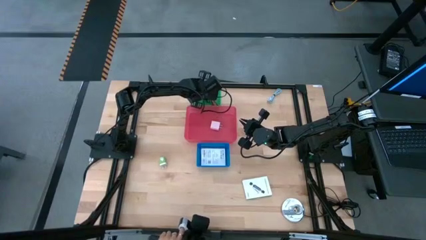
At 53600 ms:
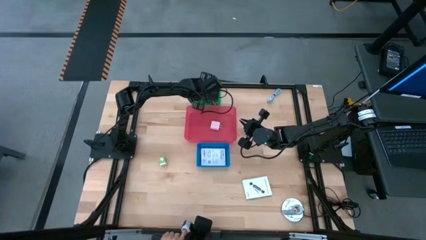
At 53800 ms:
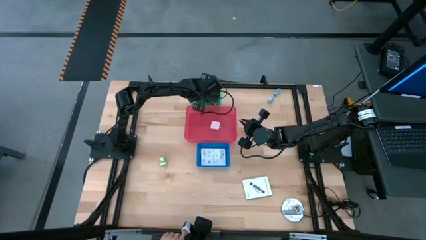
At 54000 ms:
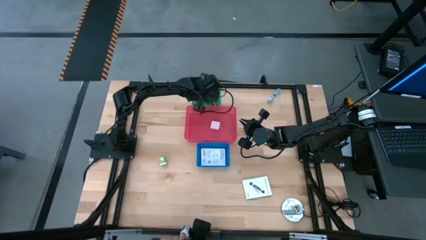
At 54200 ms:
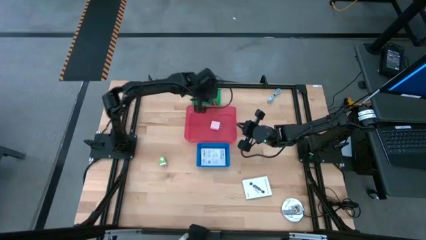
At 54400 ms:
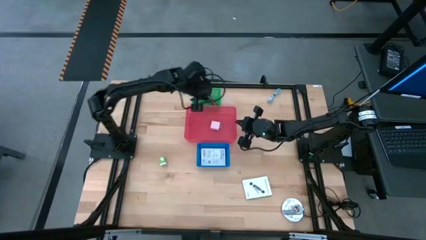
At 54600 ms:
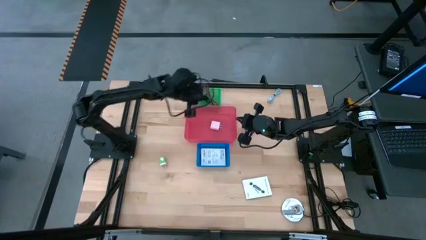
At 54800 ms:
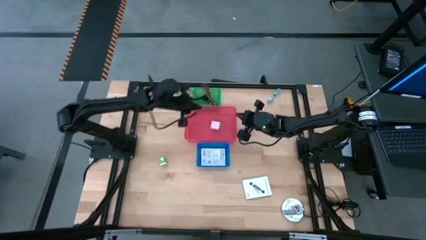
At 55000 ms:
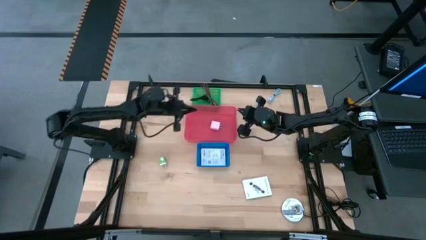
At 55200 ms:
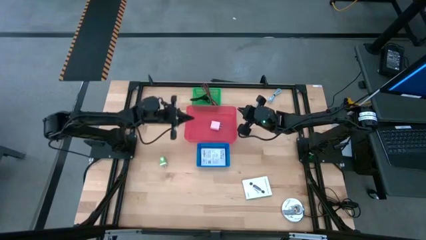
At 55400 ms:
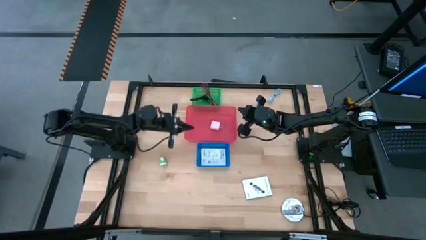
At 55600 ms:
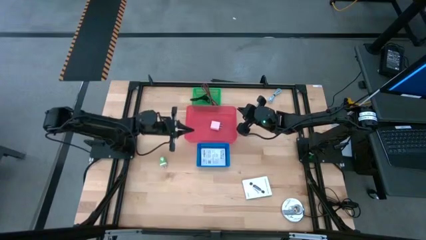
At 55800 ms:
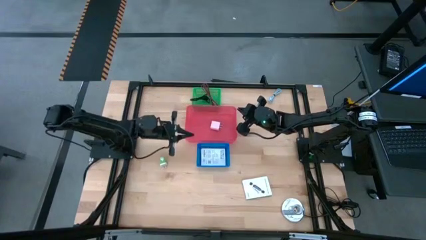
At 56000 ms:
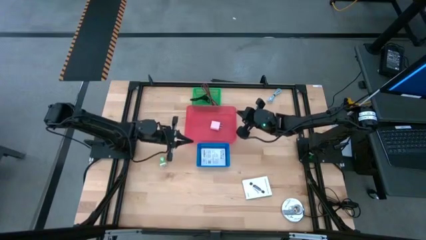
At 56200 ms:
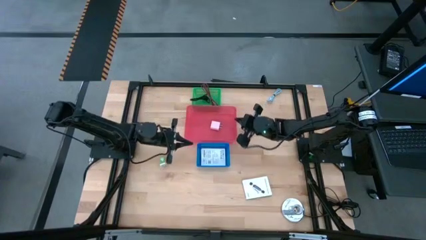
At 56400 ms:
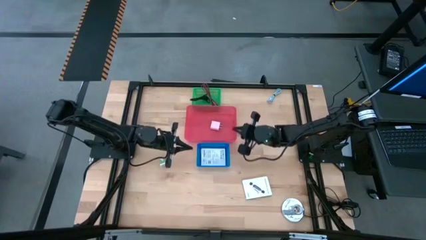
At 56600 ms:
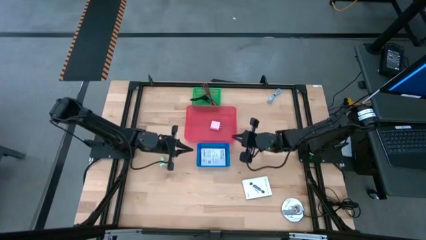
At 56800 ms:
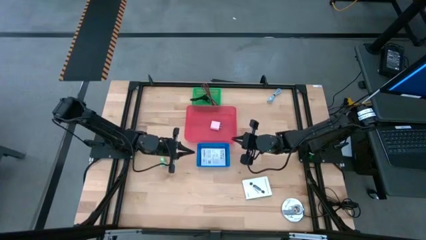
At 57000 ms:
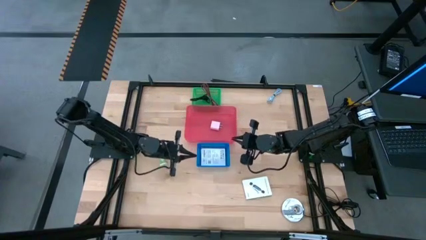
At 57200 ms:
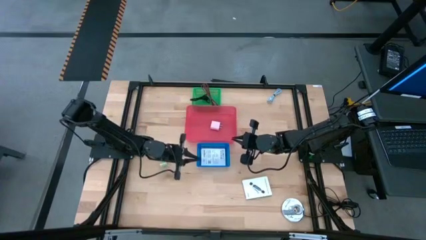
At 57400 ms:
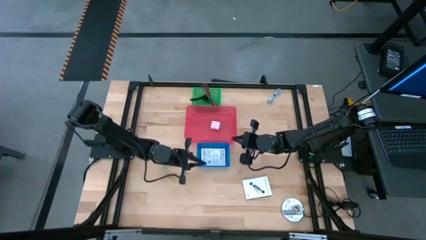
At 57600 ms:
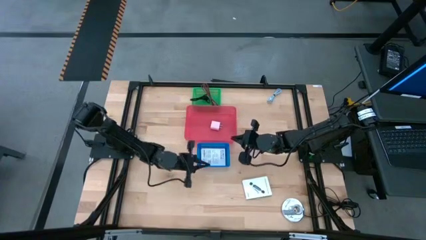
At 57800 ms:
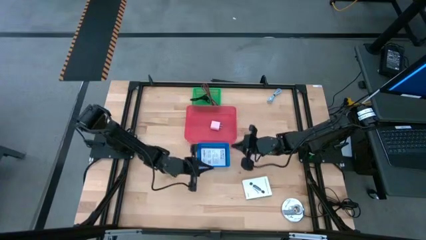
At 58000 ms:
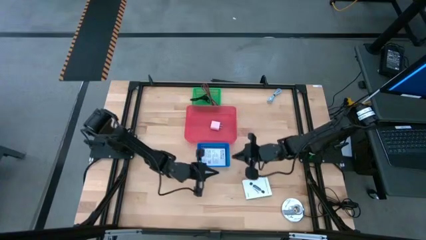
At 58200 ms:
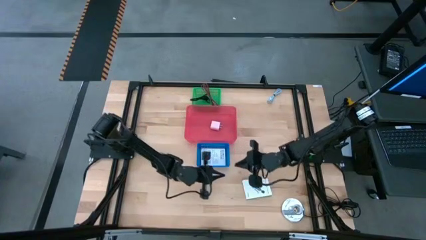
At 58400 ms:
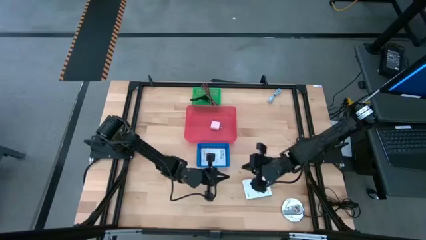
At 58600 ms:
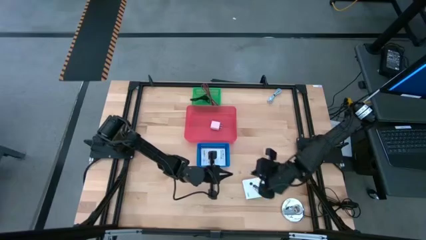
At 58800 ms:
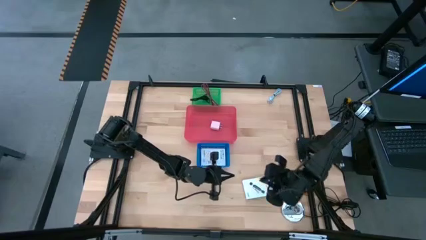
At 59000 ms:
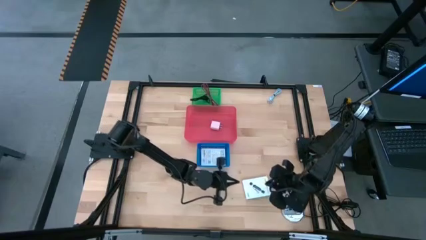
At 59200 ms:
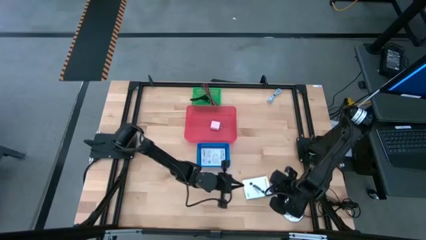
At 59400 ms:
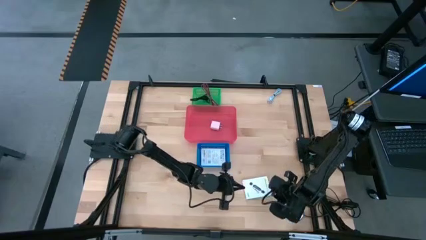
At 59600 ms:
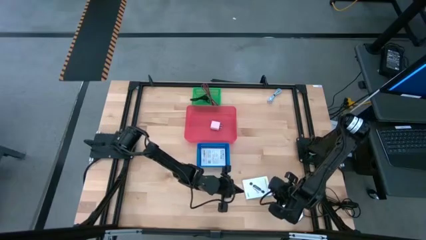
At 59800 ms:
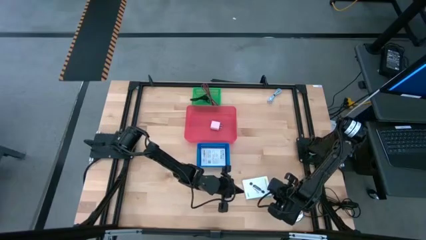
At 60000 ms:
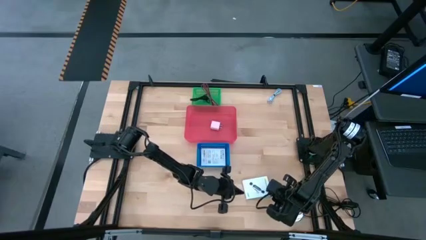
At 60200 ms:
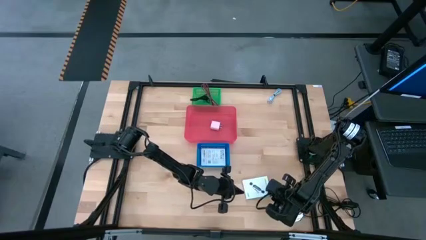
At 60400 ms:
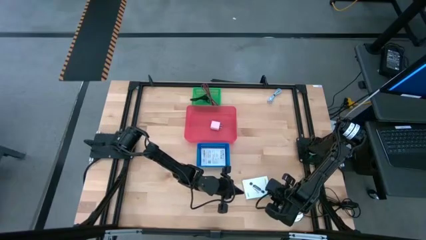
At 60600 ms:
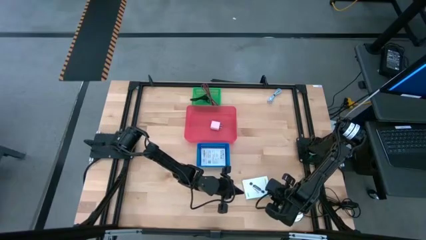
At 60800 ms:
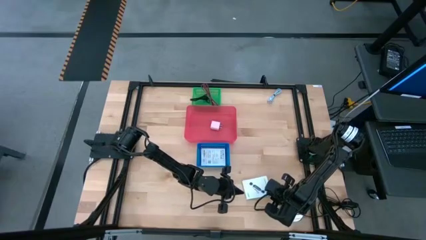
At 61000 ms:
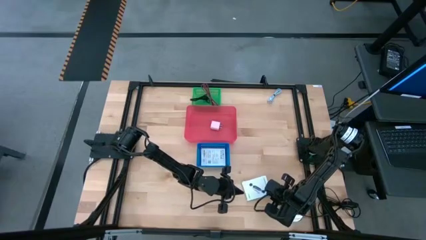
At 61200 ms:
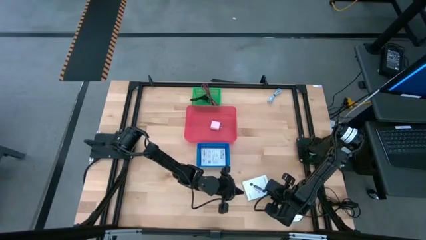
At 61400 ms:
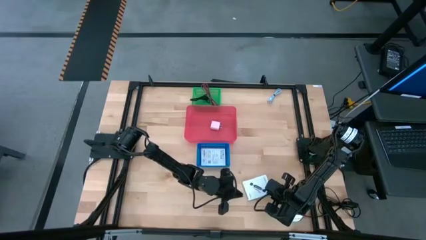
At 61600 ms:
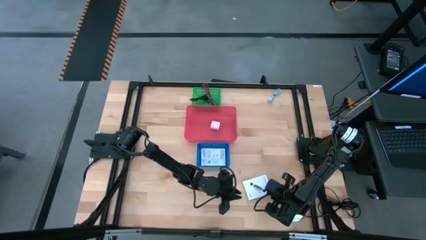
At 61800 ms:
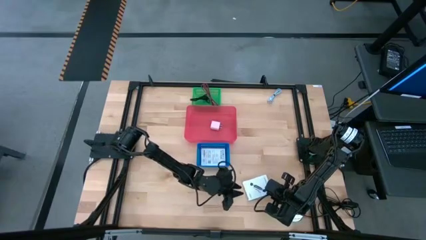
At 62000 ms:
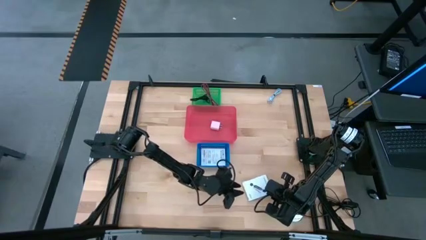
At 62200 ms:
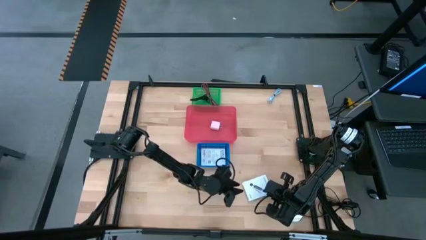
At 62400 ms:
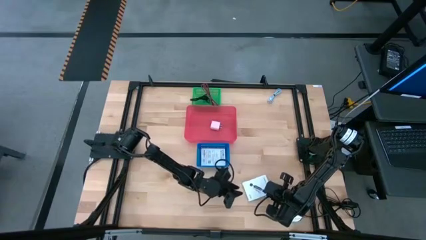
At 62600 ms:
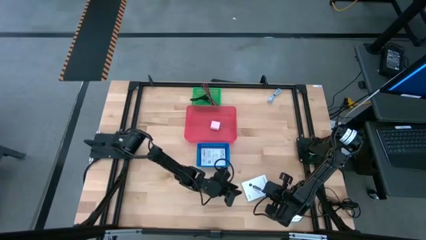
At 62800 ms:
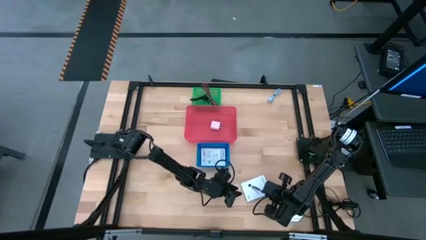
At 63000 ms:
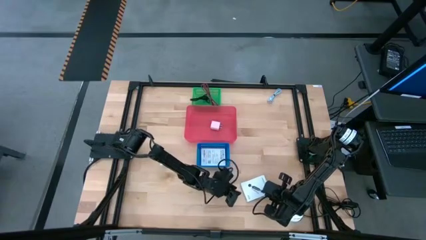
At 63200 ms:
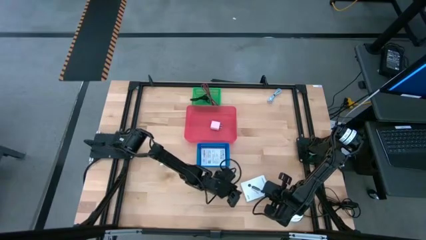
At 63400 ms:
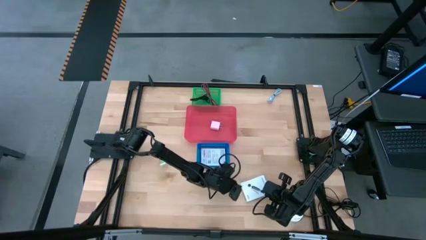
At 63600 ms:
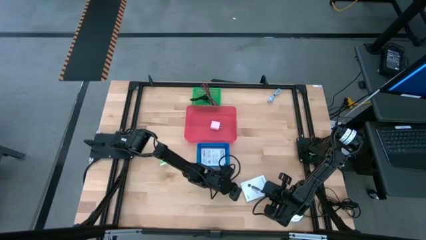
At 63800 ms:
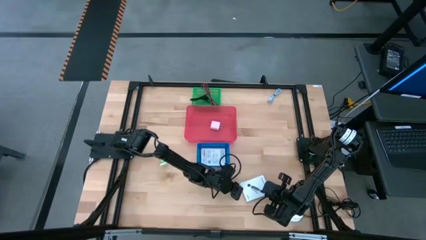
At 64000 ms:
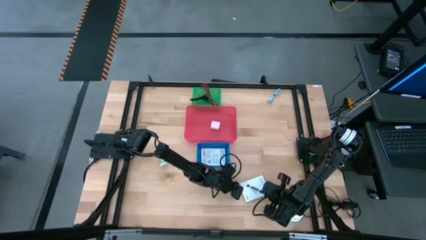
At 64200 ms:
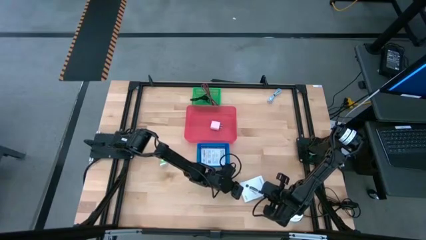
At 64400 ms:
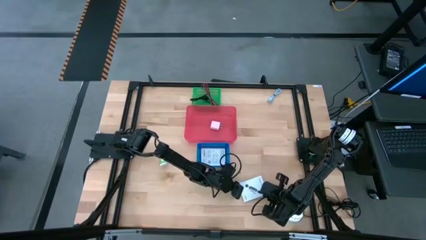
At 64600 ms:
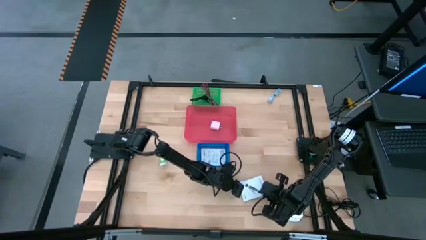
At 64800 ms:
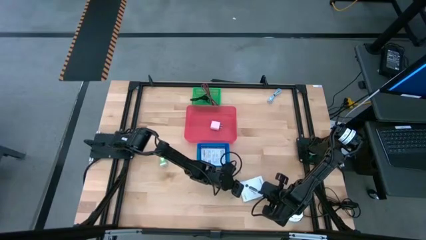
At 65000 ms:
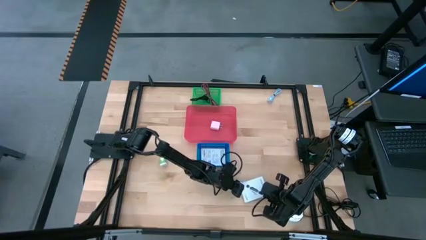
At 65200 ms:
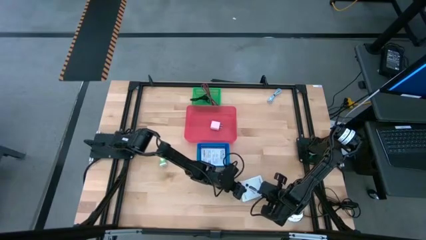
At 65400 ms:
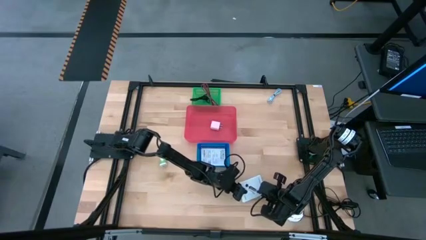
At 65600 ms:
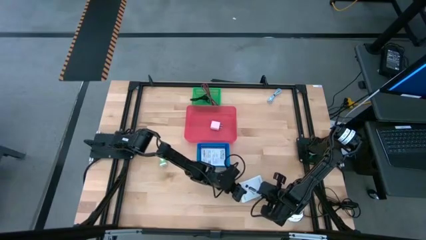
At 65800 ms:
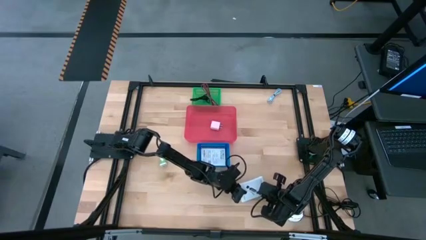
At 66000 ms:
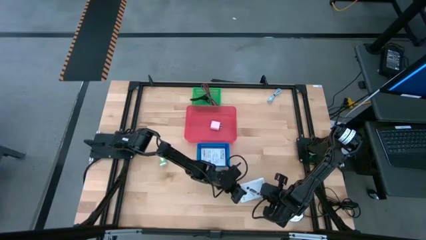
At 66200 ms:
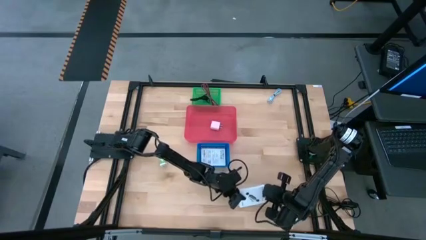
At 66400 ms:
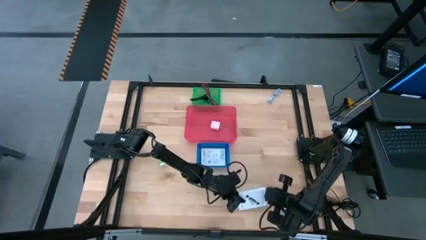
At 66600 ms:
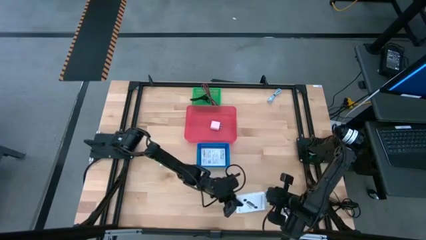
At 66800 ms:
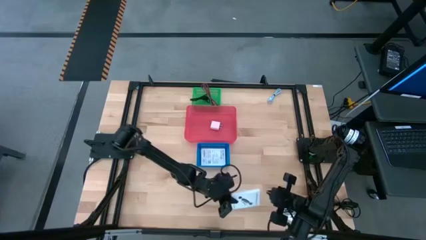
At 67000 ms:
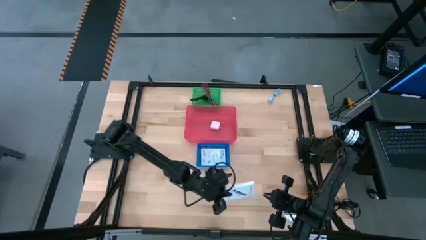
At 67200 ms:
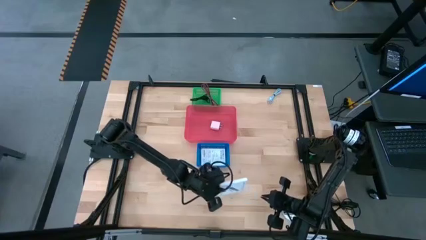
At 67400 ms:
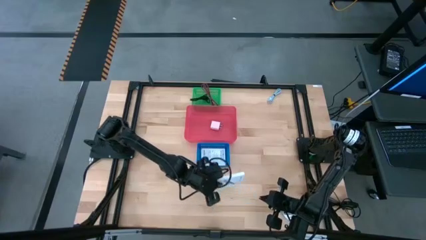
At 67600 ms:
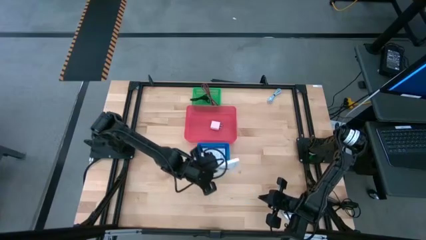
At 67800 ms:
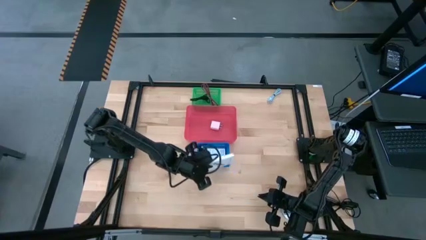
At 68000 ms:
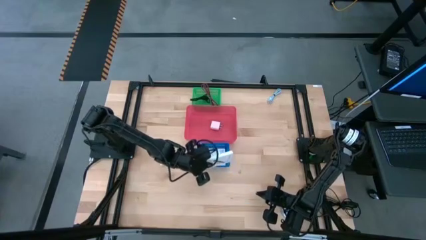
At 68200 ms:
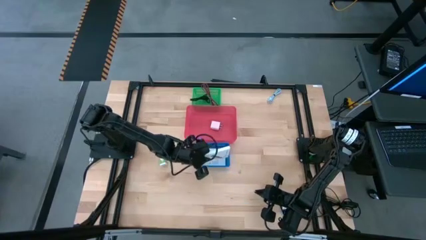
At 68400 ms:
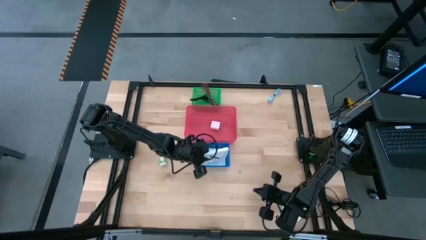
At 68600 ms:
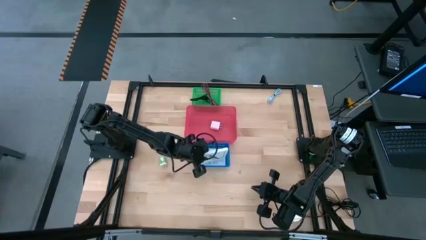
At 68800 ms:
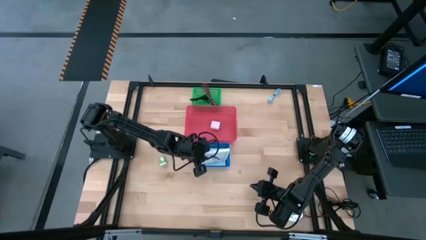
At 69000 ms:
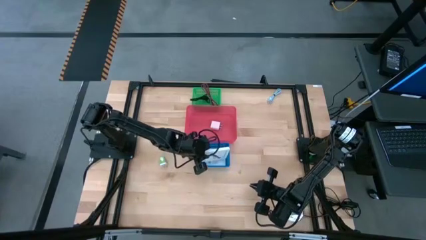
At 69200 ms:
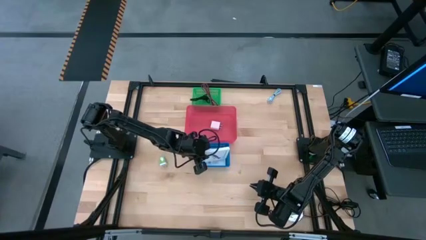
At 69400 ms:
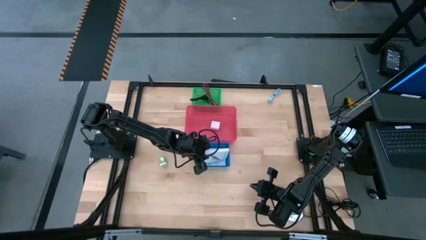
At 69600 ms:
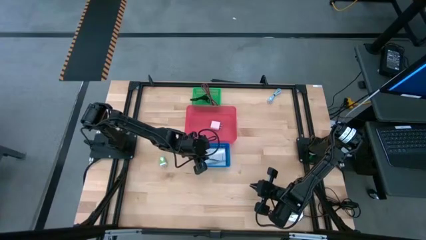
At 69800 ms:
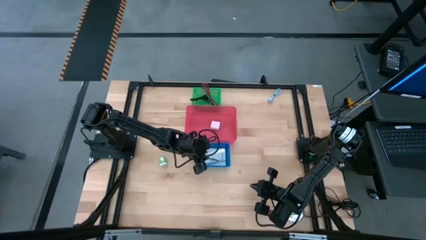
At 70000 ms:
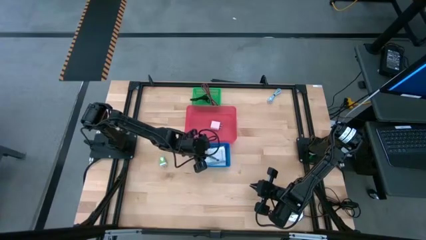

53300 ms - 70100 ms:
Task: Pick and place items into bin
Put the white card reader box into the blue bin
